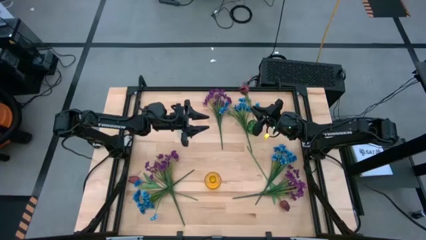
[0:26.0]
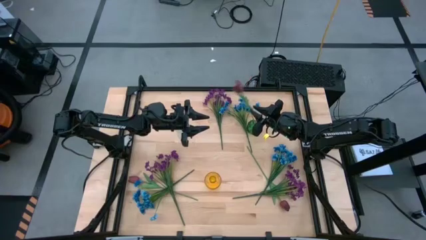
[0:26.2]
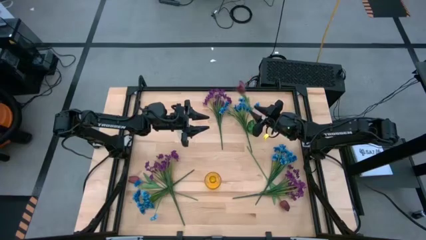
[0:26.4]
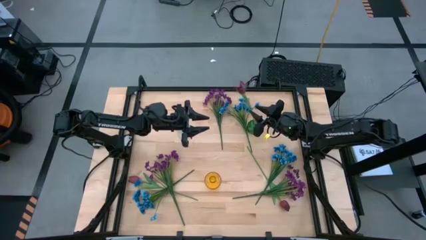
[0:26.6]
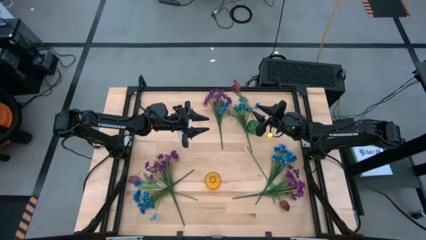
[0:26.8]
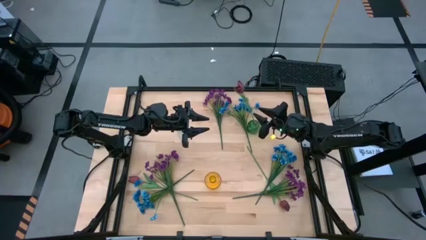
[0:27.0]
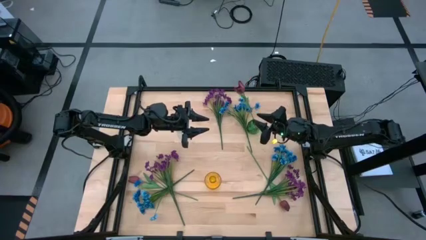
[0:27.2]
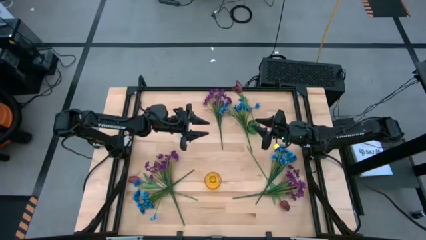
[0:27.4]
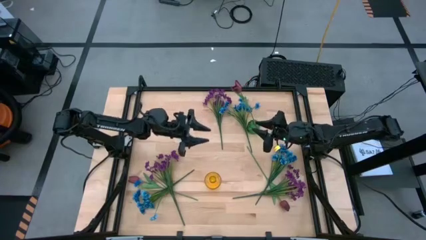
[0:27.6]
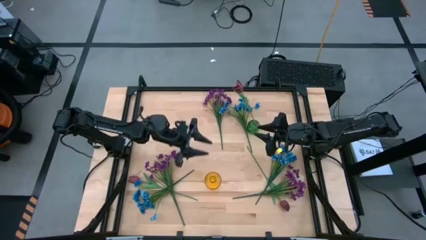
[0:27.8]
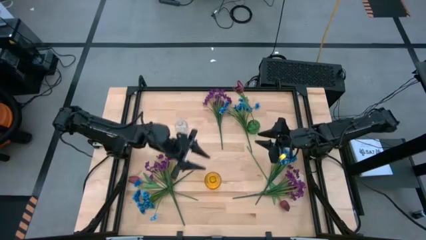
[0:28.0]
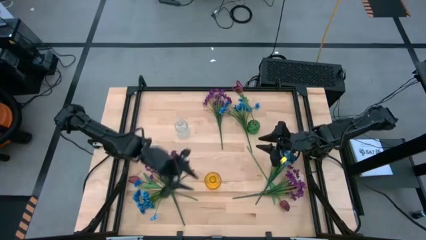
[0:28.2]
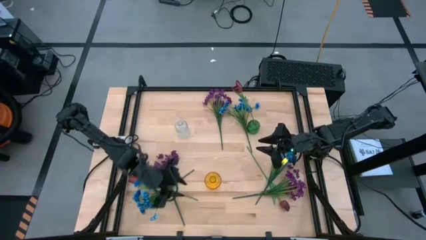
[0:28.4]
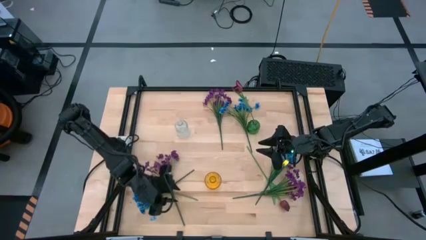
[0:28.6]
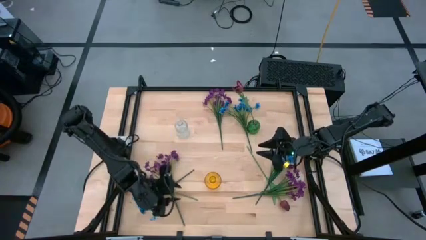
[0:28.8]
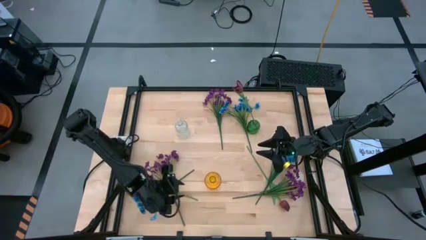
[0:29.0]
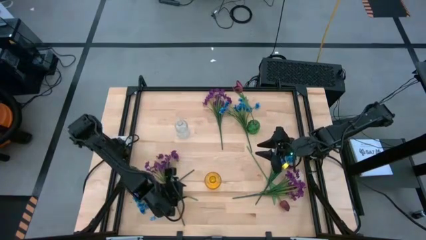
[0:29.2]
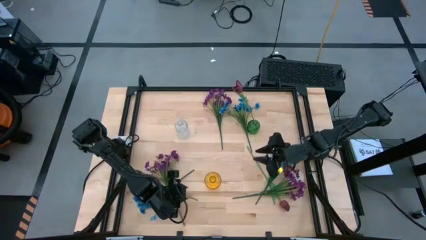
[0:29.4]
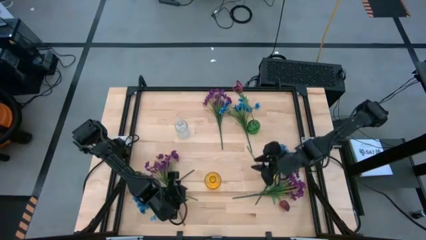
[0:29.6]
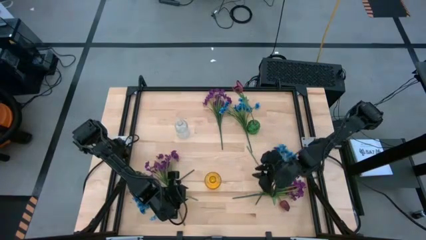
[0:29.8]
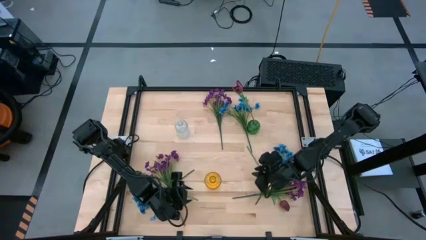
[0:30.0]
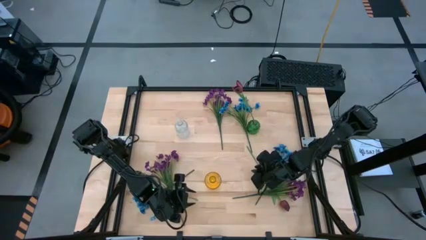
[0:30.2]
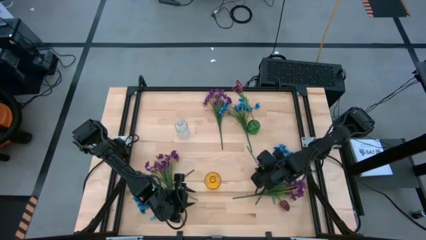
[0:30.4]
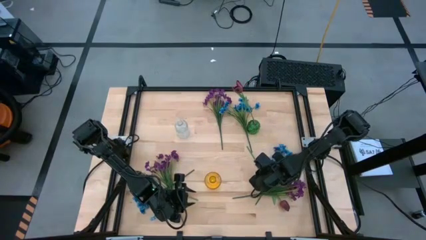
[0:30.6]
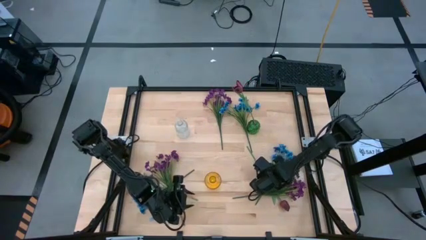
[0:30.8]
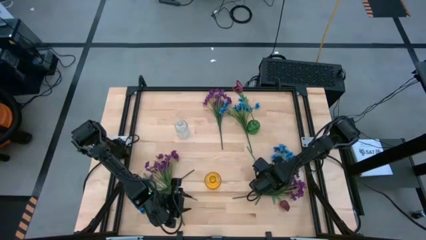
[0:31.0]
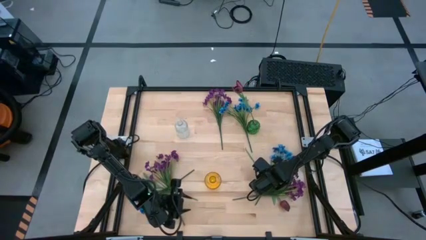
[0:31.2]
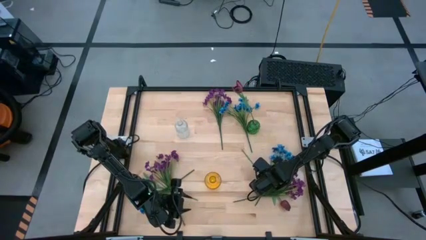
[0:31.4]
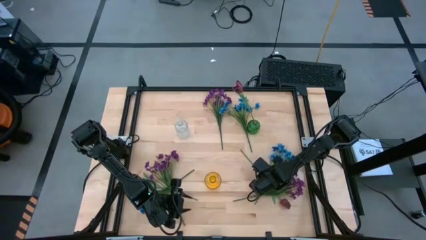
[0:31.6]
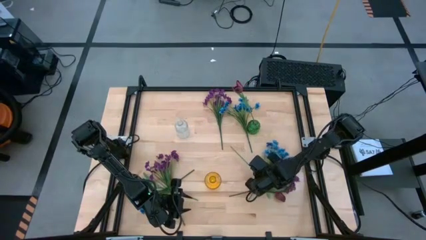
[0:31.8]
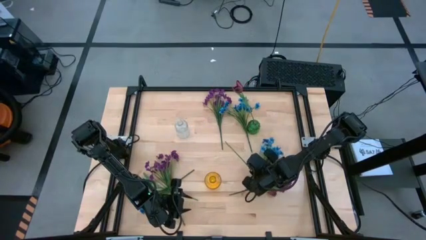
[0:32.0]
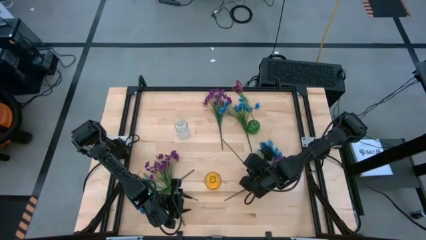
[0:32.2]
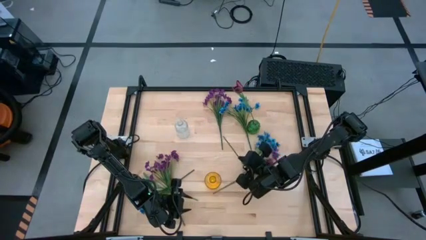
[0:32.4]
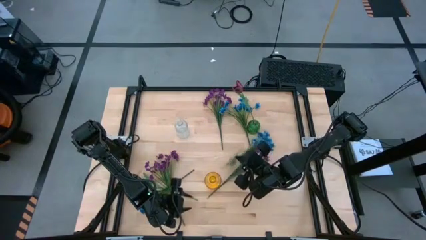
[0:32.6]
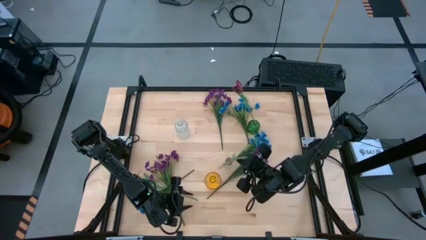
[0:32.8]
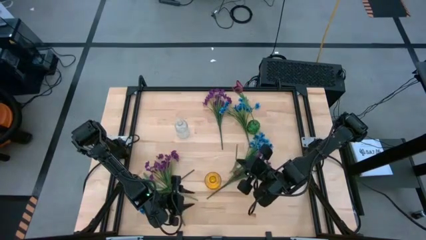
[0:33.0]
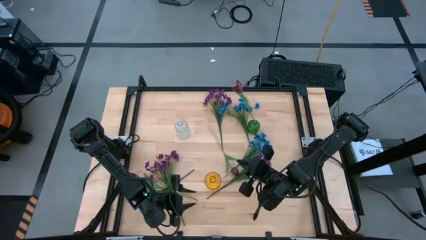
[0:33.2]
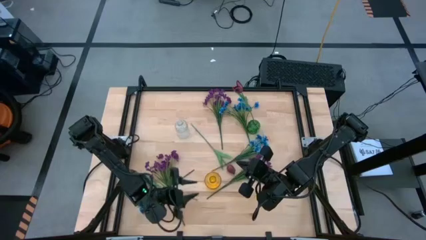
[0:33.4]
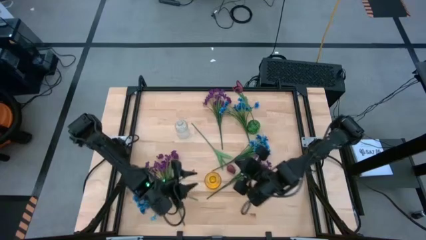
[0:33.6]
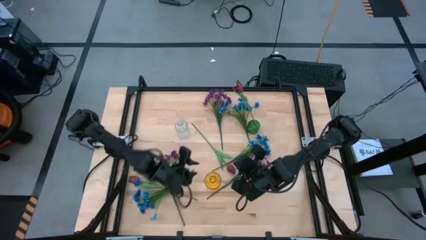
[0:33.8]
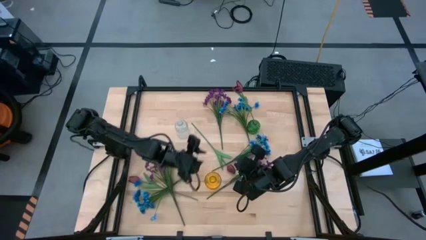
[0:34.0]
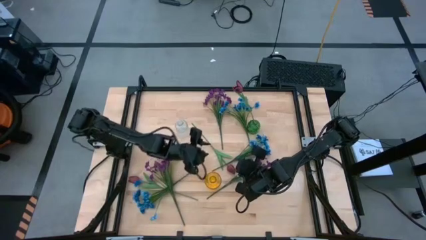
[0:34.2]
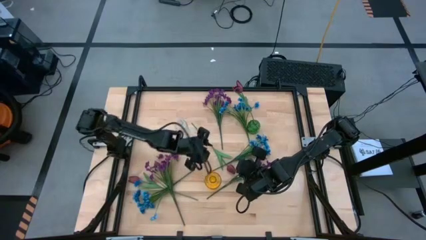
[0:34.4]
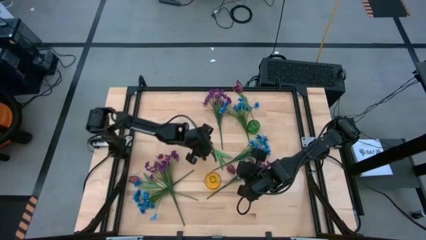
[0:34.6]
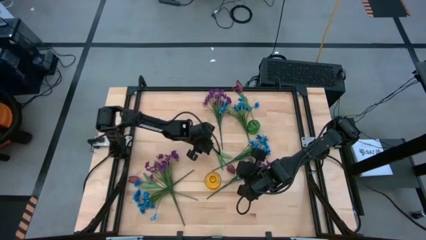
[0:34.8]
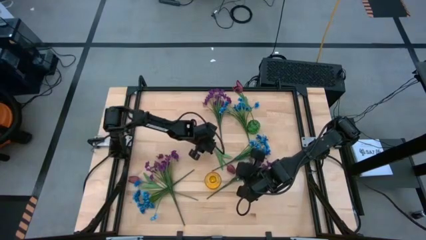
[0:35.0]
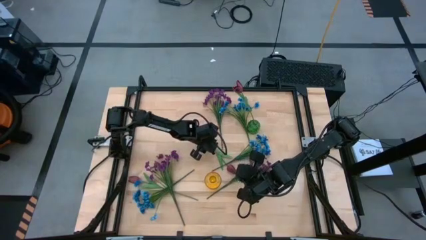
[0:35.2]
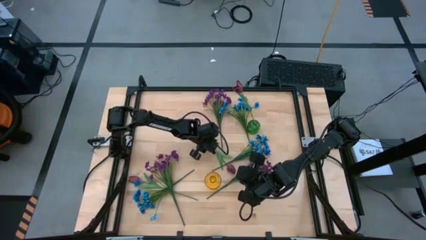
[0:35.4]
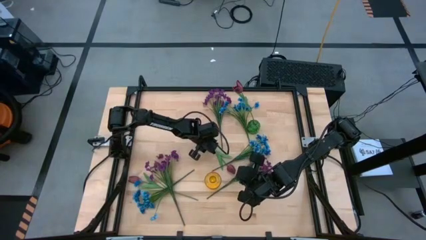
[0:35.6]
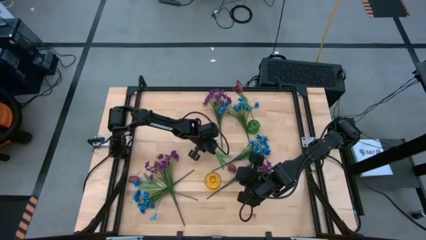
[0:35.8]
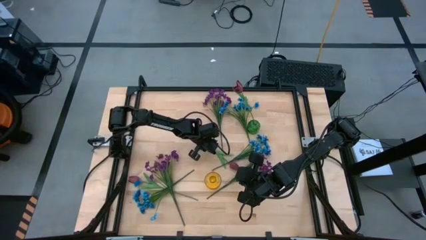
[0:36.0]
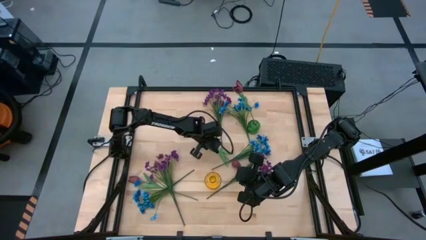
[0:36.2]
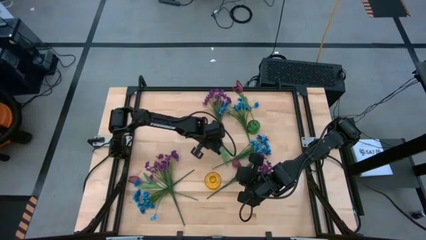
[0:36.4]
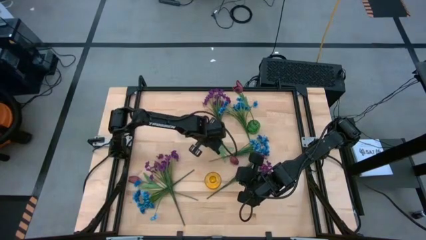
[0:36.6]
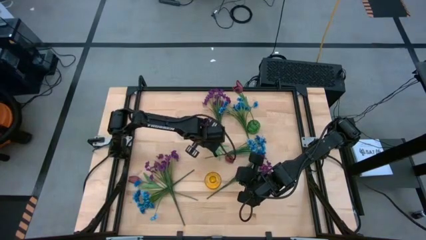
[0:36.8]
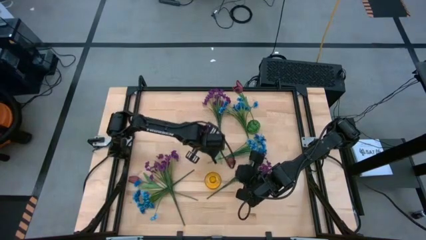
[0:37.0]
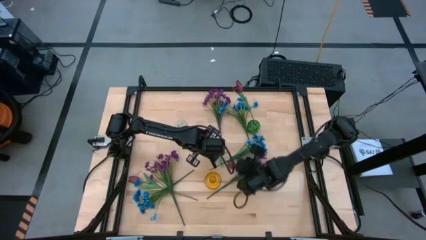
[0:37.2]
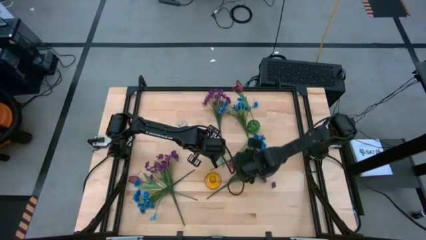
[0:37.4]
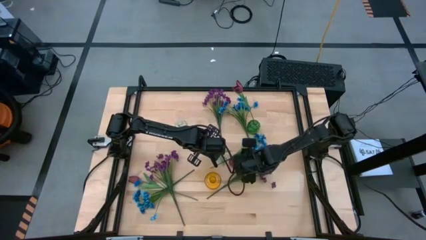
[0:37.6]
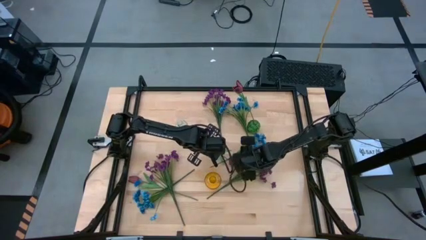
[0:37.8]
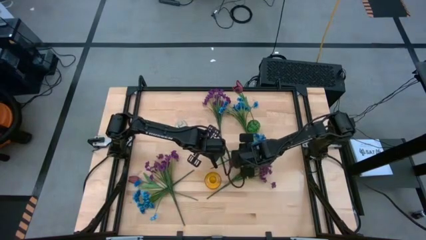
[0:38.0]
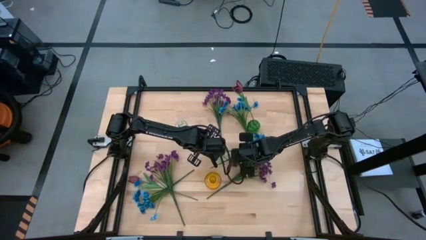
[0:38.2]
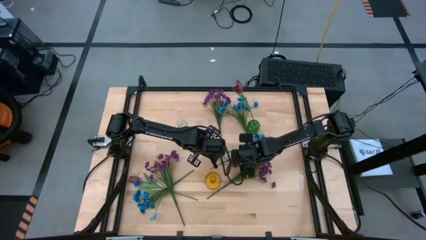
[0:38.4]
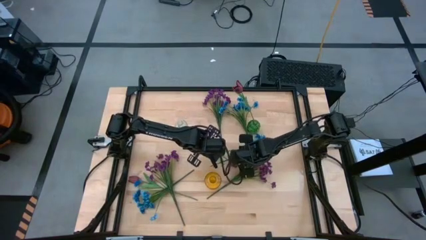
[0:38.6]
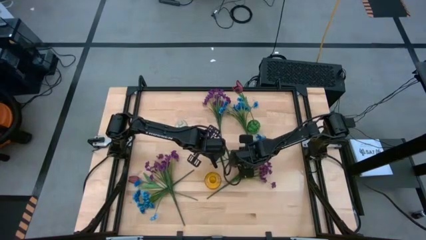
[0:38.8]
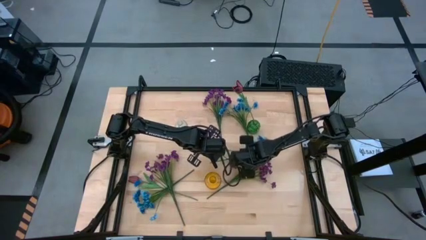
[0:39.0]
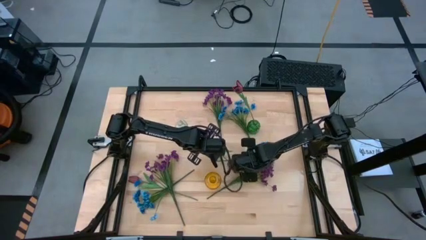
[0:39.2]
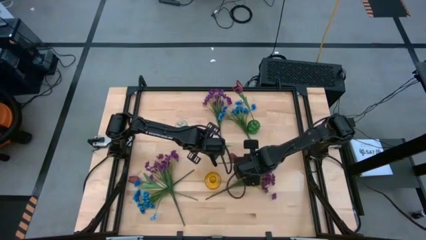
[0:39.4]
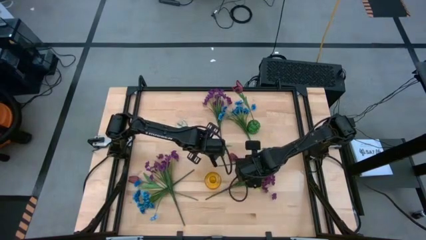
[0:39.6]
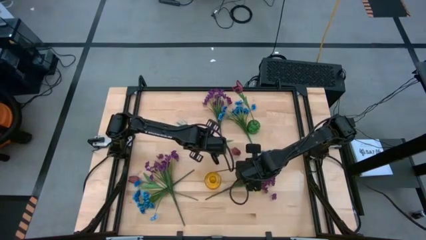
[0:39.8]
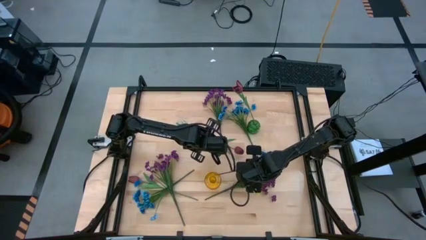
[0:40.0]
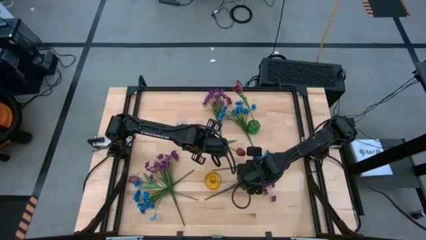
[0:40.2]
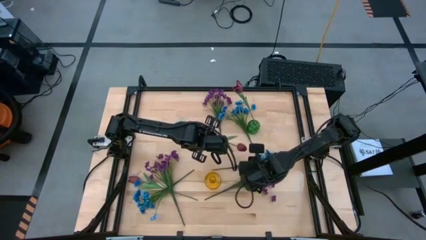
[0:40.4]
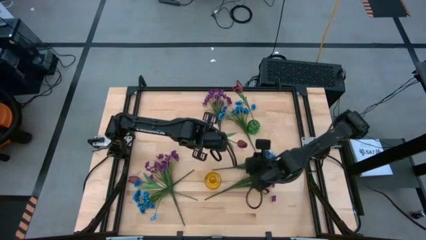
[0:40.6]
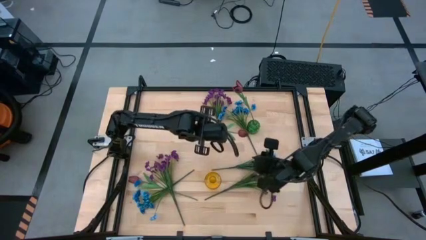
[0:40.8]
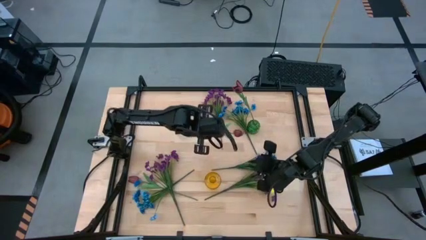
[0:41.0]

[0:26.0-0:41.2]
Task: Sort flowers into vase by color
Put the right red flower into the green vase

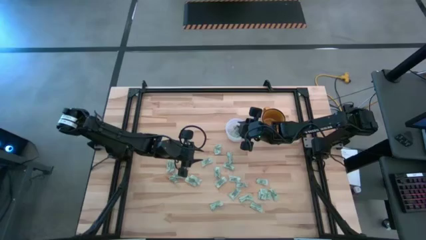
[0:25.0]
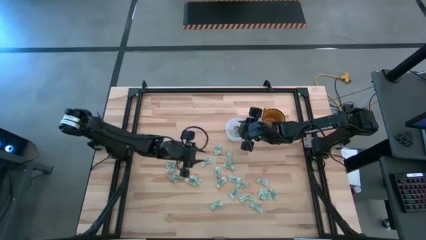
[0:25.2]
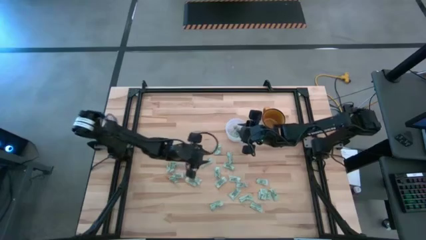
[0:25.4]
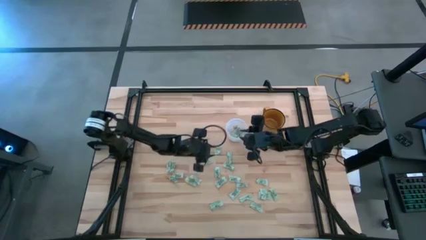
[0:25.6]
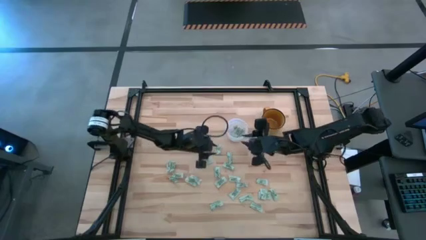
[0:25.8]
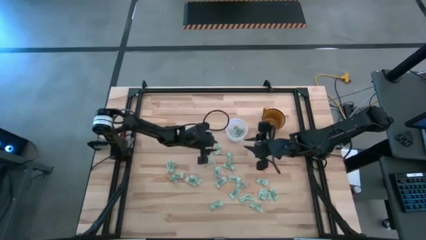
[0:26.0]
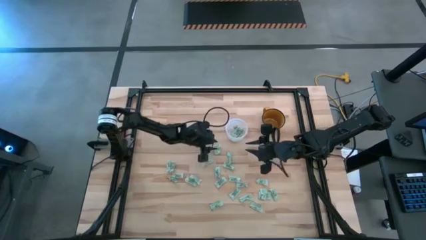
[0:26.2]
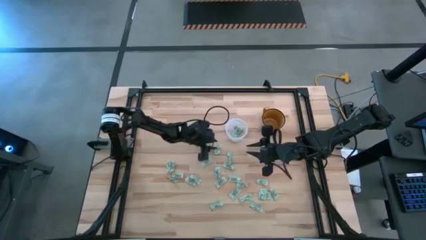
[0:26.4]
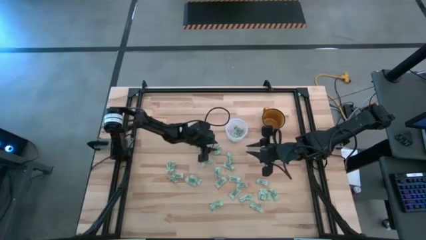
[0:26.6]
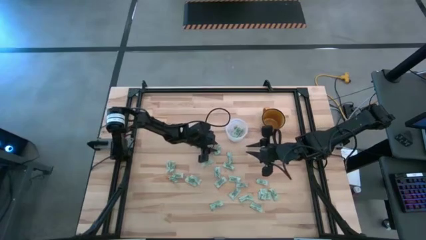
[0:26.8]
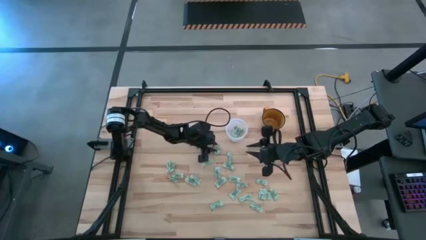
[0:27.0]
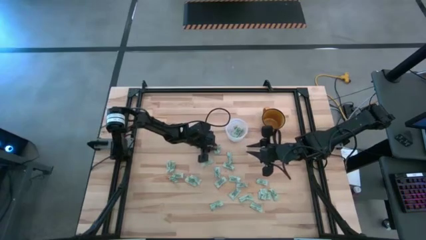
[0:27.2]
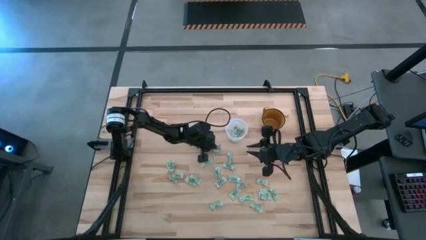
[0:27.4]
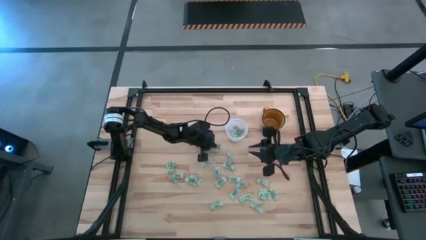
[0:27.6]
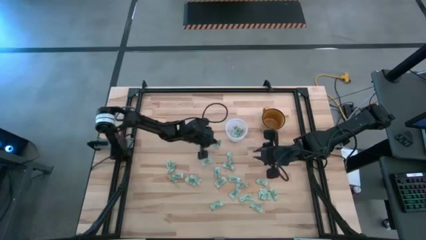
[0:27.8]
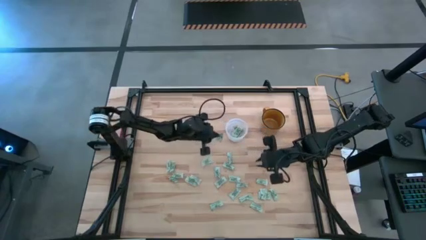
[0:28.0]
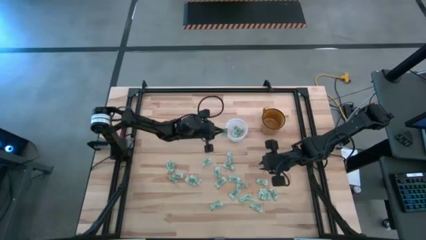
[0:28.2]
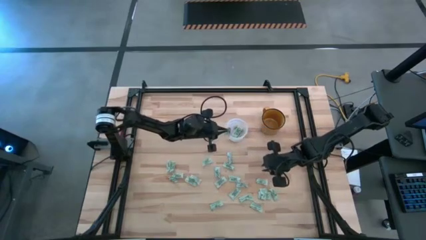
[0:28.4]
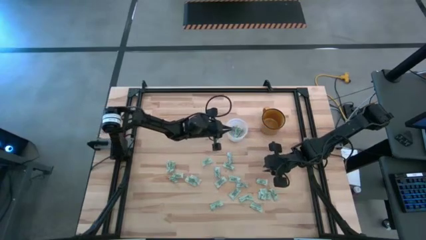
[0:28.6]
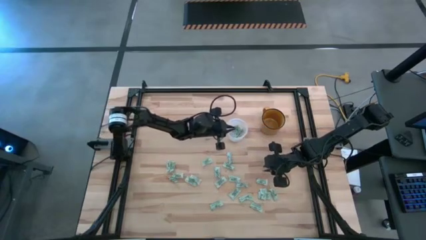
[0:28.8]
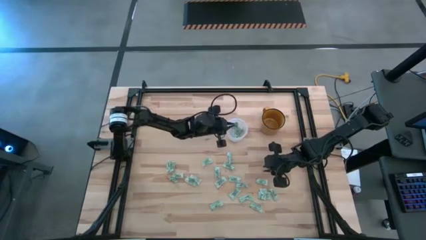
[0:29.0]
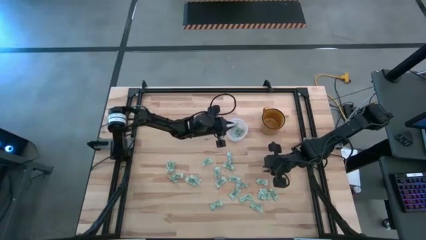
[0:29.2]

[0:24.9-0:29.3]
Task: Pick and place Stevia / Truvia into bins
Put the green stevia packet into the transparent bin
